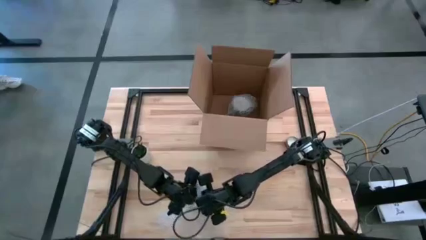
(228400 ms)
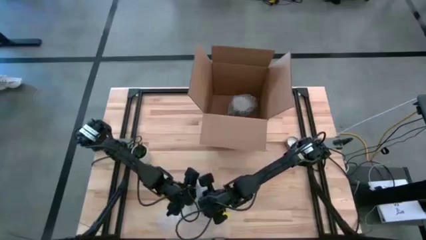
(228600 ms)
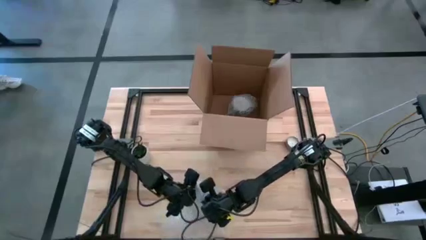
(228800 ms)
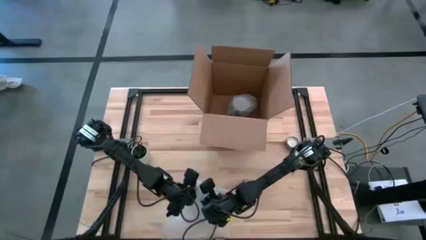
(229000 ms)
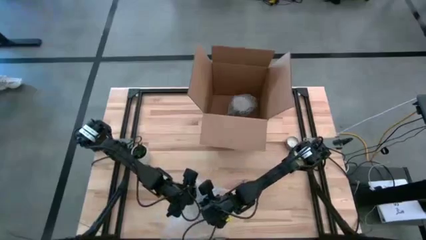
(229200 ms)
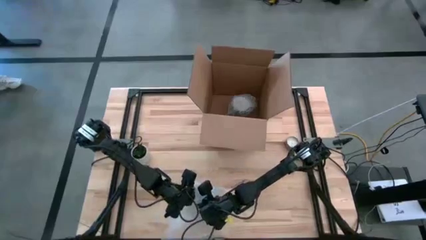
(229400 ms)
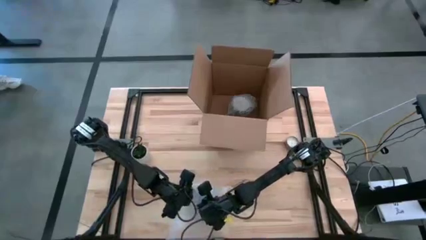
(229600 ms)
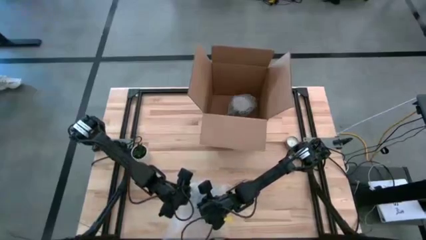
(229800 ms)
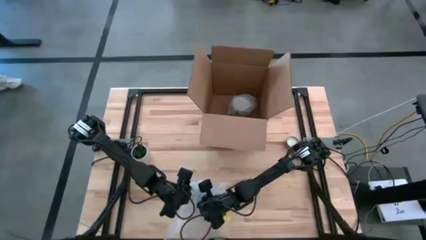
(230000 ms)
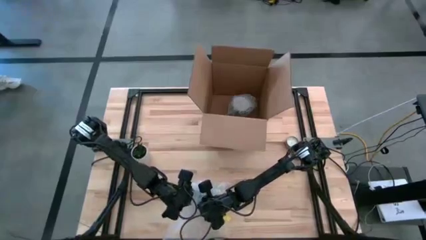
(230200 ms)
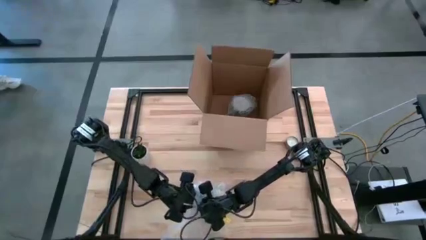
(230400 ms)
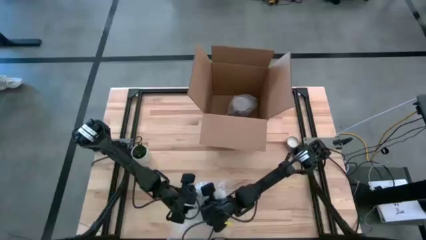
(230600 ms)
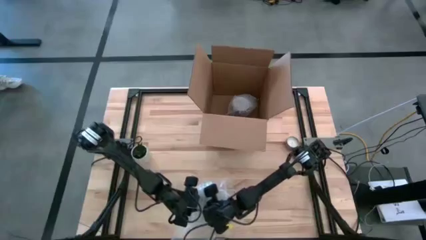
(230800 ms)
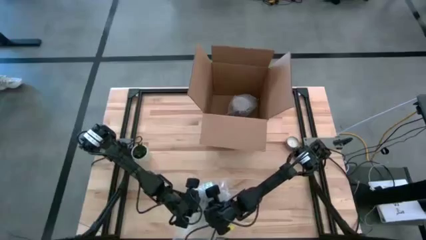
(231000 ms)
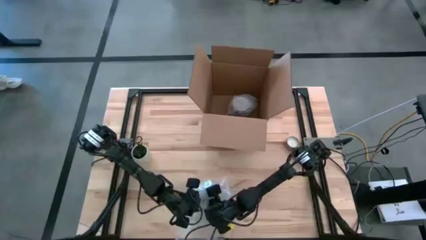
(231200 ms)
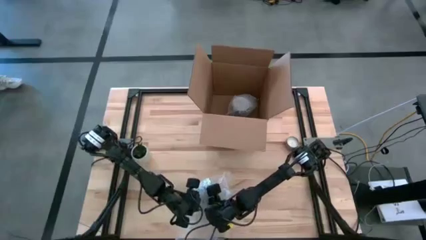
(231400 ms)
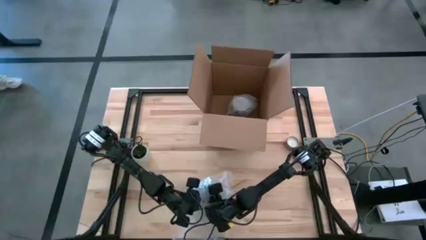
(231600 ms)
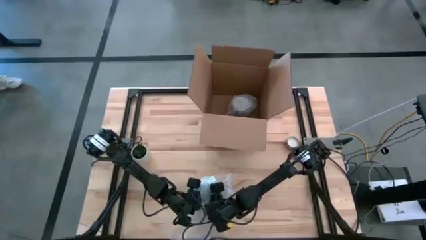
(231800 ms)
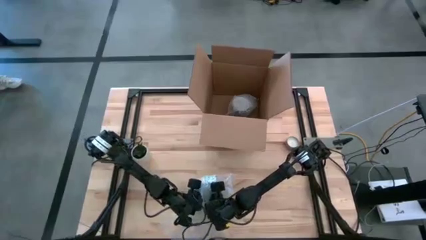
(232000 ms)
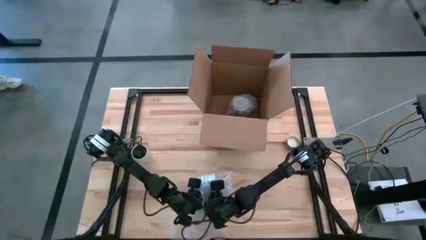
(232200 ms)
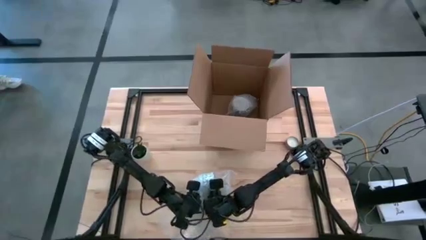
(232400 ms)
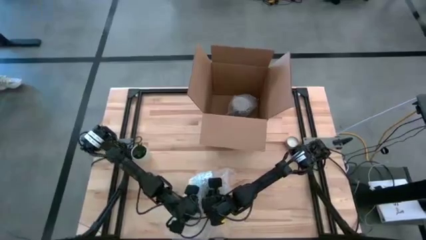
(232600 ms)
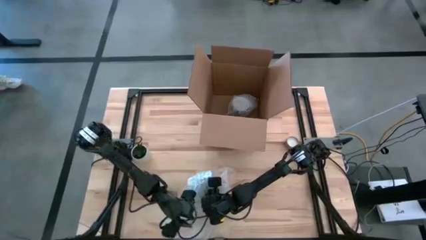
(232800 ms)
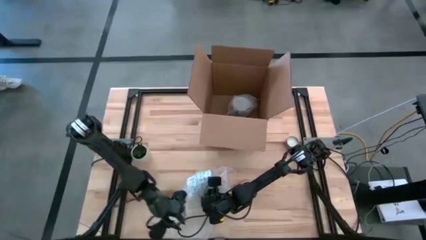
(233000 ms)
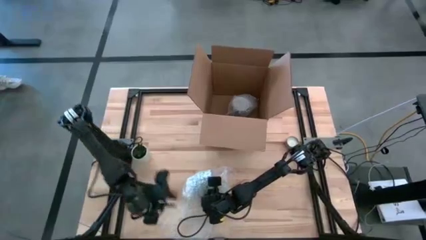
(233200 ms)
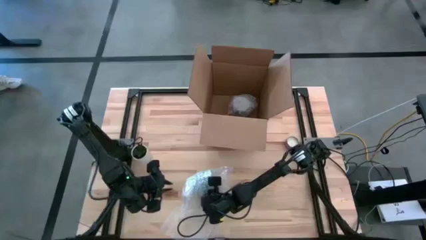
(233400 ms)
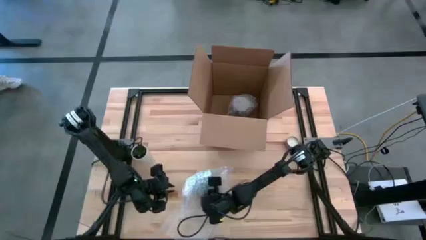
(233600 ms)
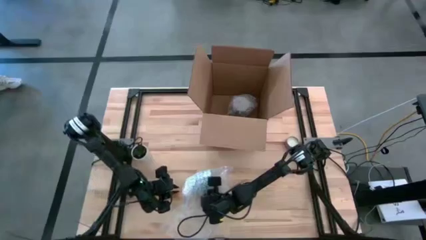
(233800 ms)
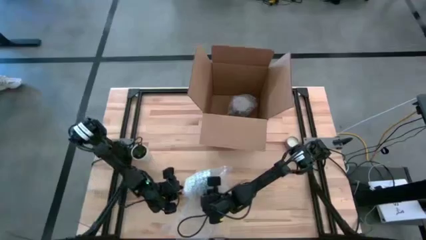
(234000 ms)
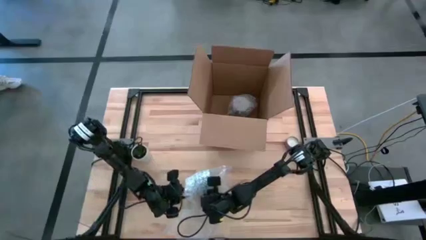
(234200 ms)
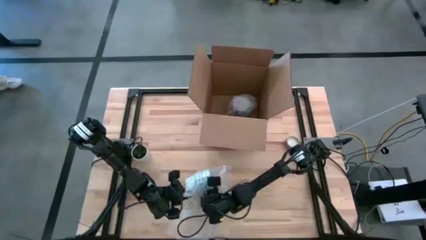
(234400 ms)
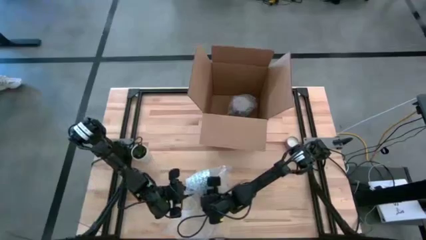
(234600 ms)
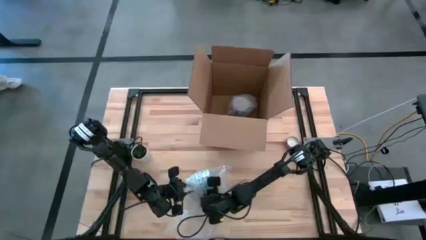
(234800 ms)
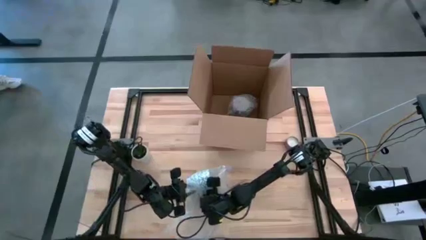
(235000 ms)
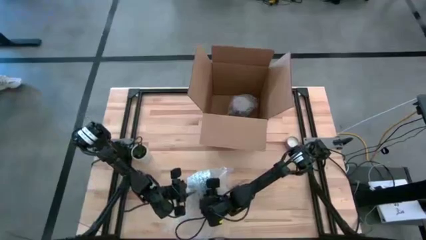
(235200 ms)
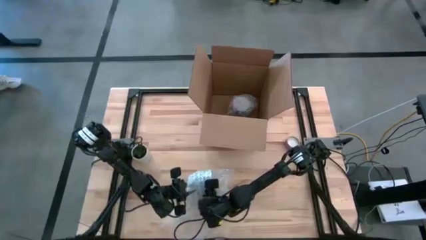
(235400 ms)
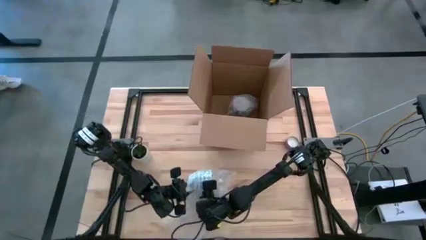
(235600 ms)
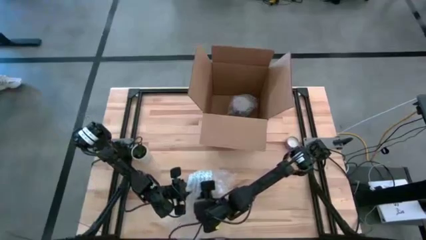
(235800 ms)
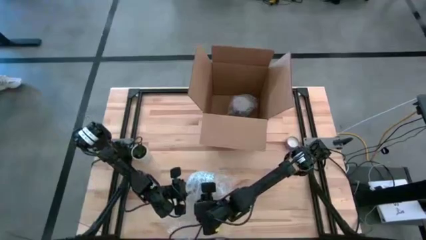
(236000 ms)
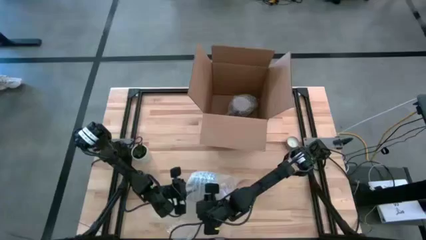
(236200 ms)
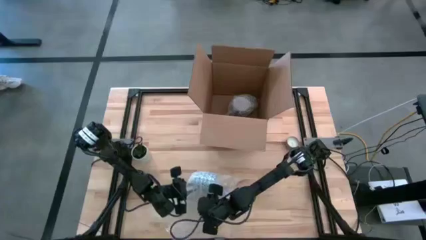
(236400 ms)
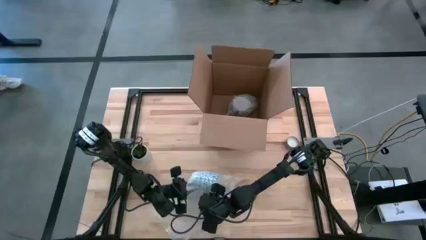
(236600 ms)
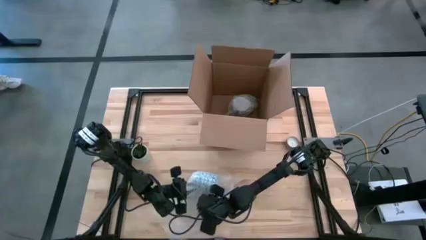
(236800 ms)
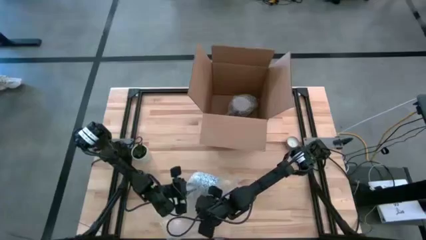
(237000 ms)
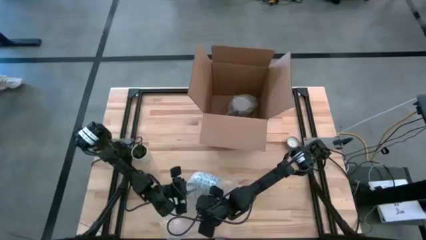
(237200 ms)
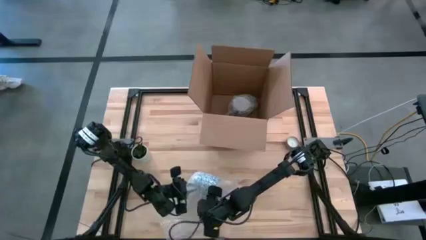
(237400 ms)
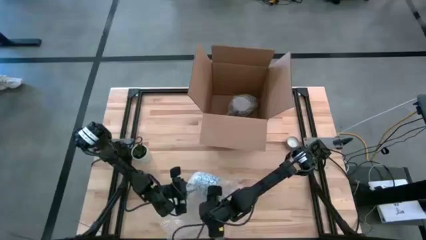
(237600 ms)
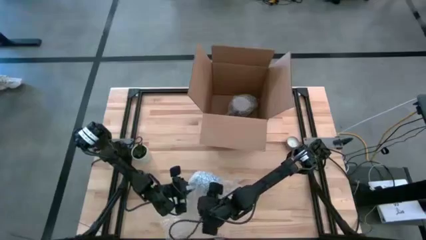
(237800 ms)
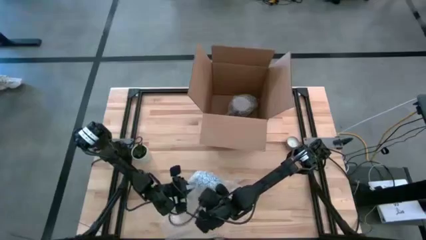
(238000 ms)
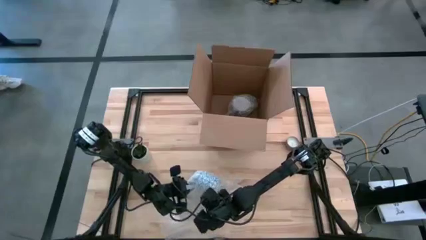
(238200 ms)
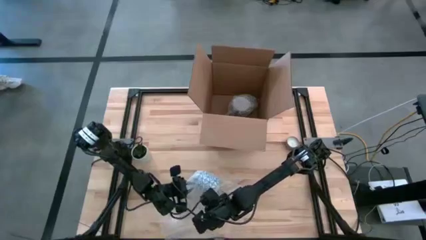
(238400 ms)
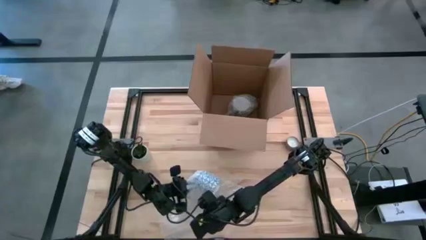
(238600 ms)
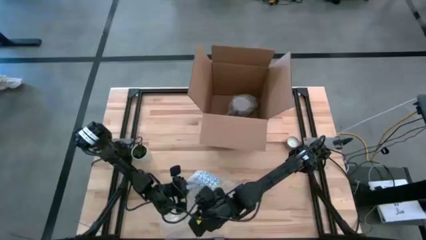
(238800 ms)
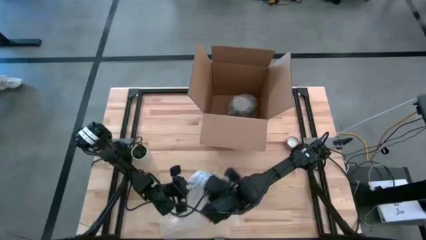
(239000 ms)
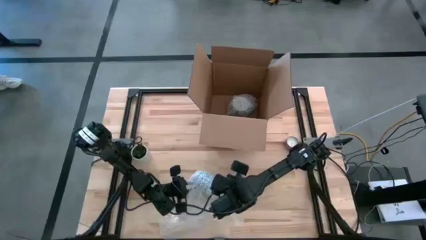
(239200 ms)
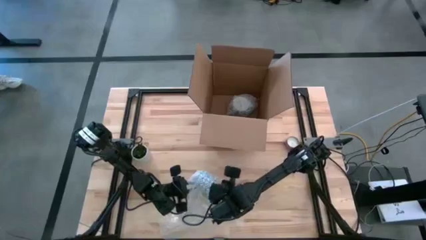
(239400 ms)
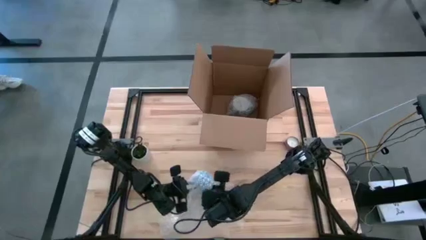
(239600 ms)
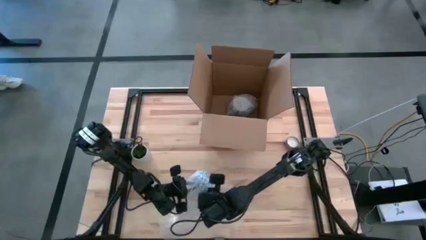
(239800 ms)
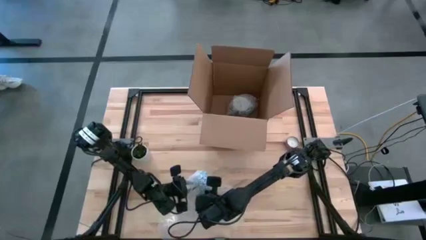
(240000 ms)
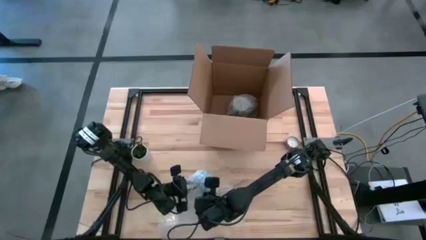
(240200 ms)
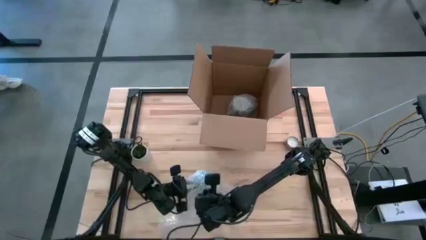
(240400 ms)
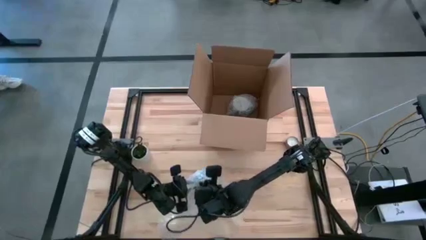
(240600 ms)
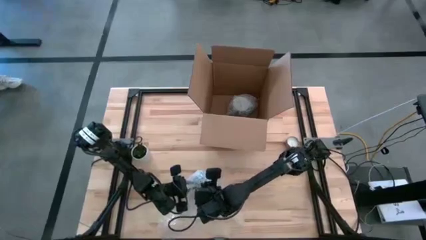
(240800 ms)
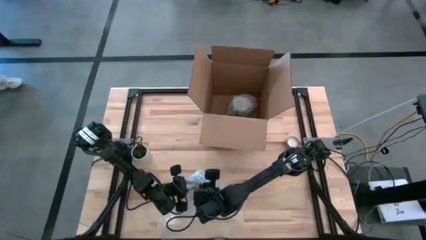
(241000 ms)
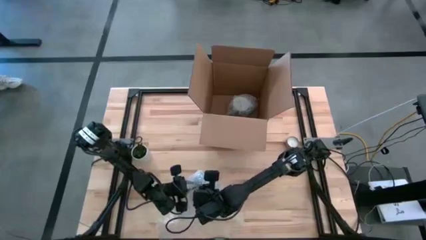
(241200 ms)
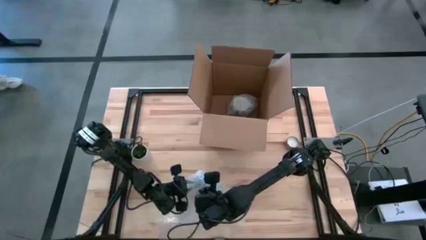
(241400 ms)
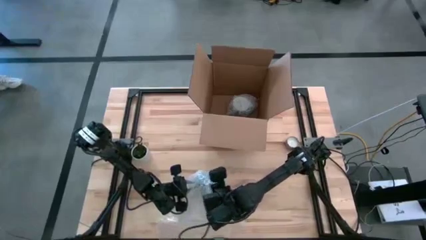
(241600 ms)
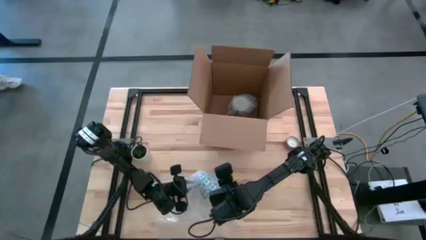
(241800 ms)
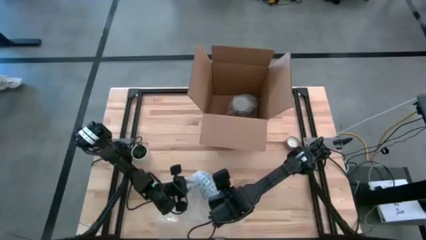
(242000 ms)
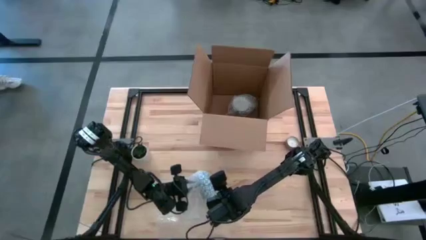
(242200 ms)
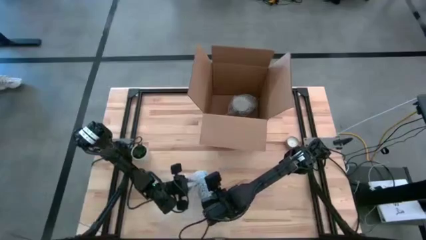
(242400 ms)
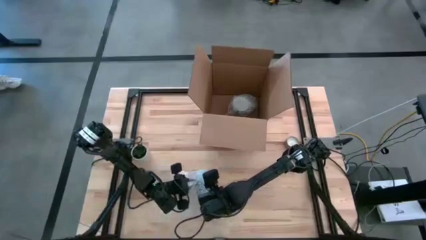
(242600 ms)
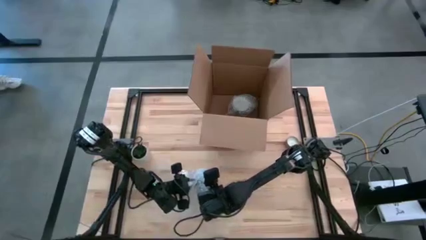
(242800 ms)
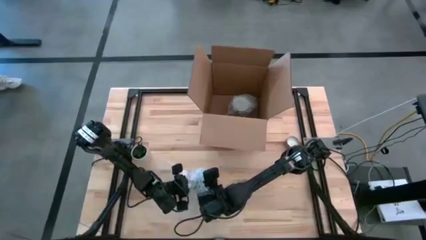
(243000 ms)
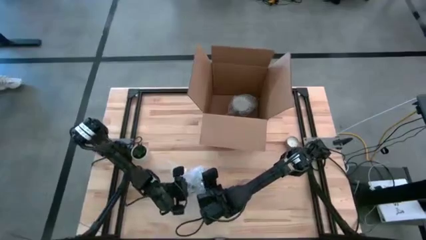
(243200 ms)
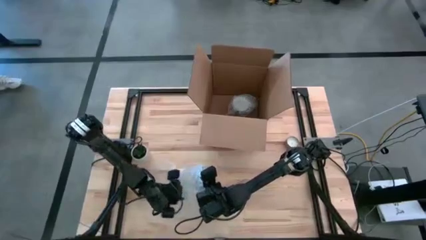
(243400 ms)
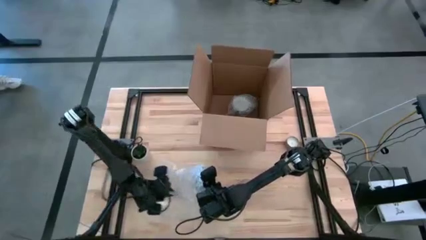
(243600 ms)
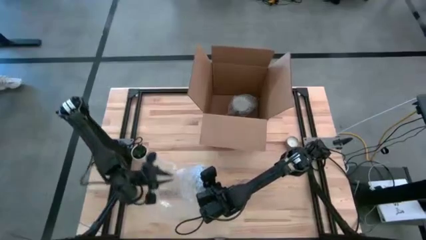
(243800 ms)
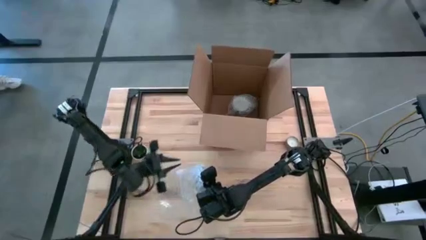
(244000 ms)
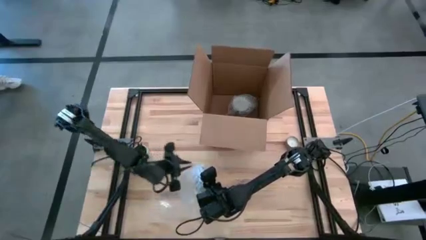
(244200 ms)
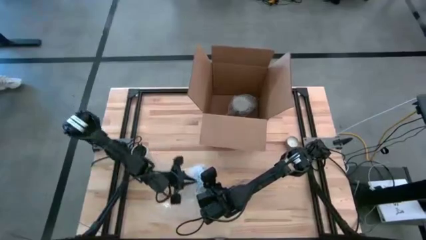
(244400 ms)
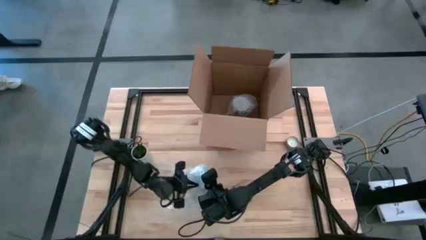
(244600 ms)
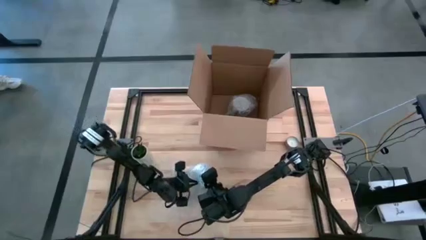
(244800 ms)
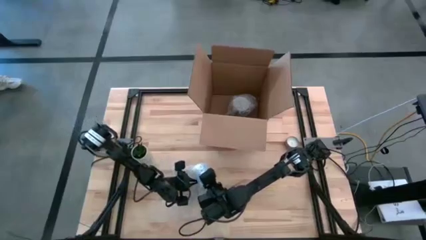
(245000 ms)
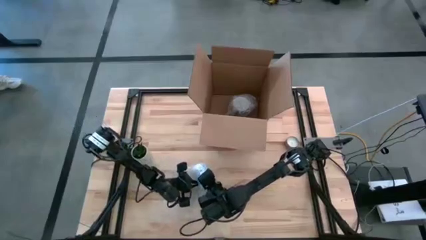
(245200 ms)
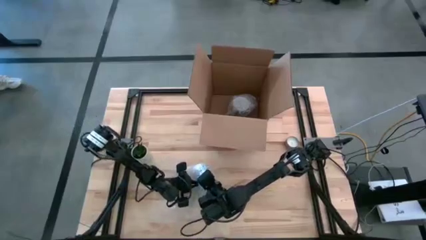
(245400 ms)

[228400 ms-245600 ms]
Task: wrap mug
Wrap the blue patterned mug with the bubble wrap
